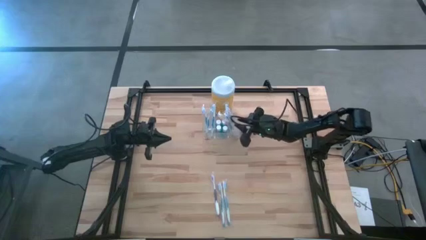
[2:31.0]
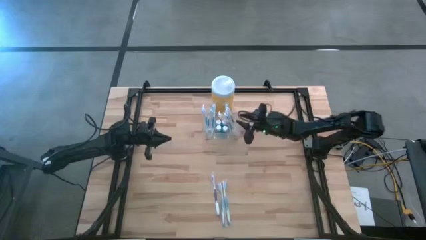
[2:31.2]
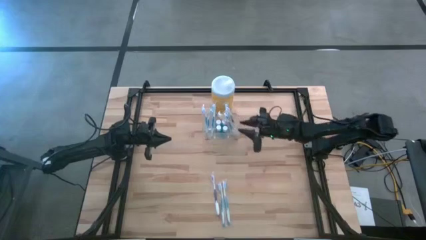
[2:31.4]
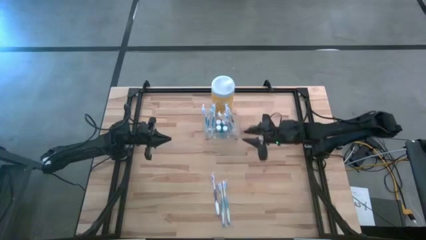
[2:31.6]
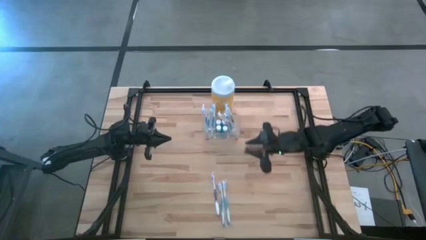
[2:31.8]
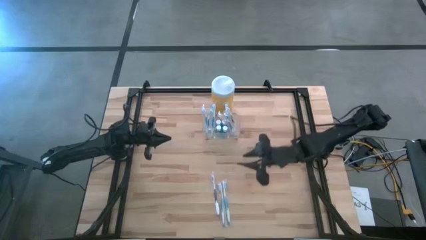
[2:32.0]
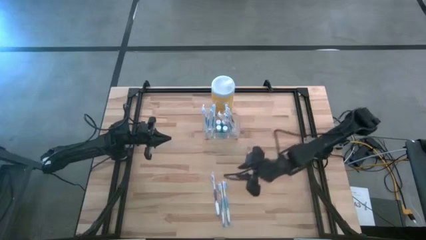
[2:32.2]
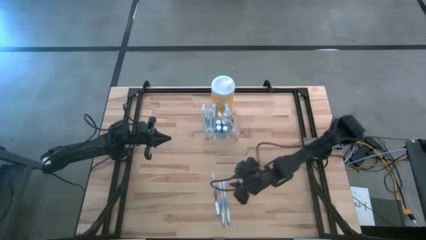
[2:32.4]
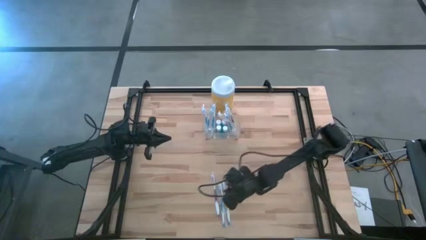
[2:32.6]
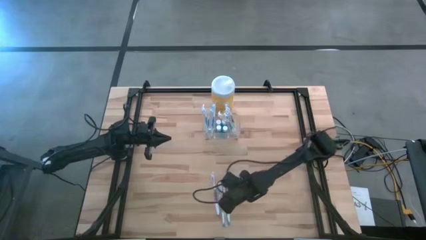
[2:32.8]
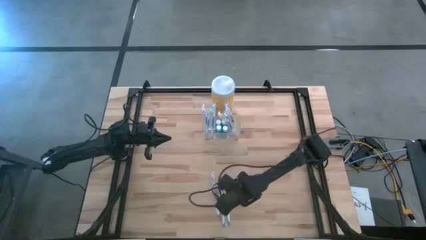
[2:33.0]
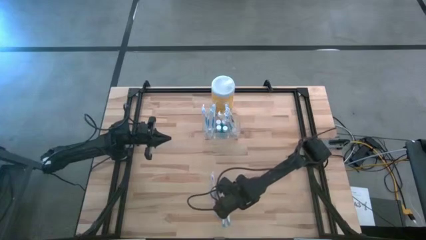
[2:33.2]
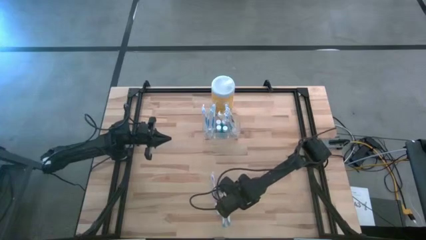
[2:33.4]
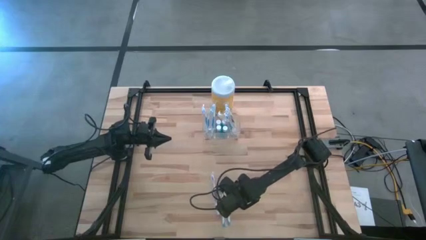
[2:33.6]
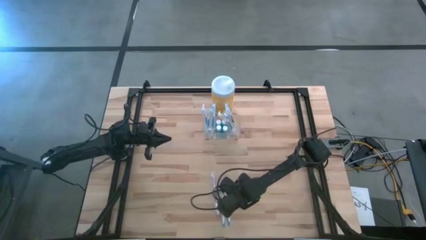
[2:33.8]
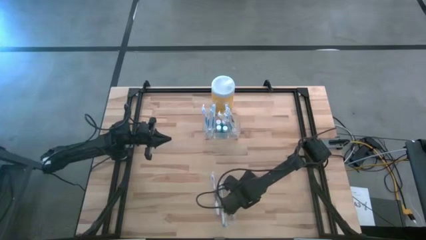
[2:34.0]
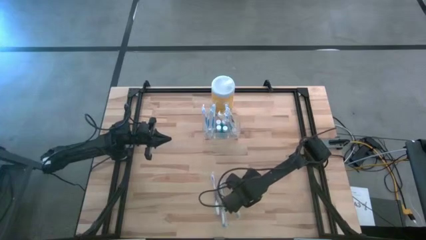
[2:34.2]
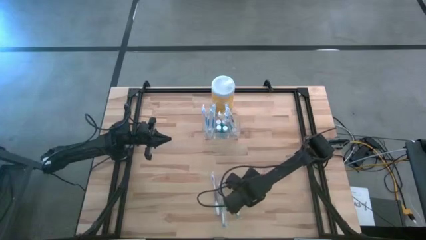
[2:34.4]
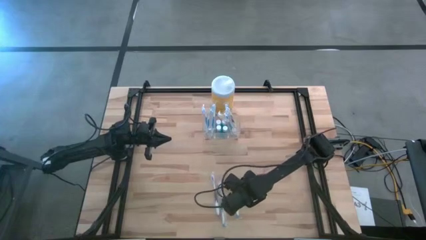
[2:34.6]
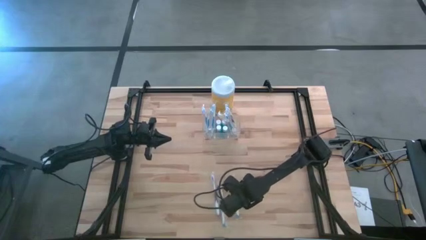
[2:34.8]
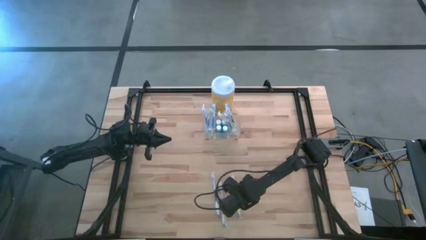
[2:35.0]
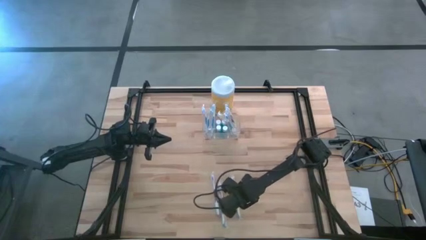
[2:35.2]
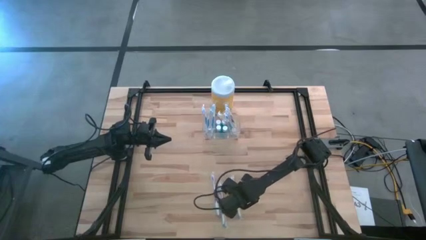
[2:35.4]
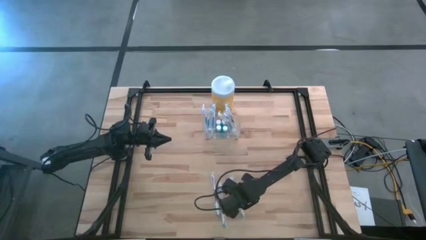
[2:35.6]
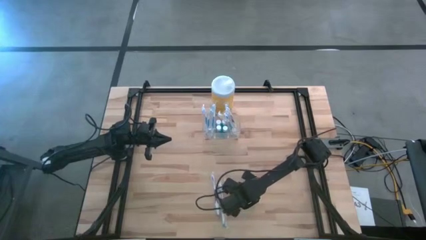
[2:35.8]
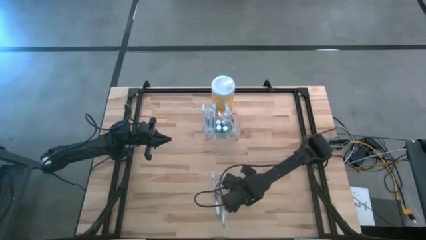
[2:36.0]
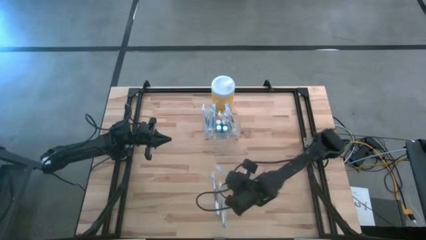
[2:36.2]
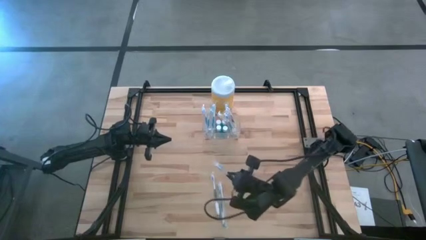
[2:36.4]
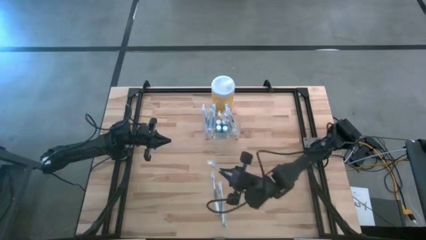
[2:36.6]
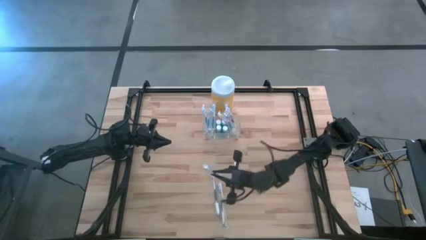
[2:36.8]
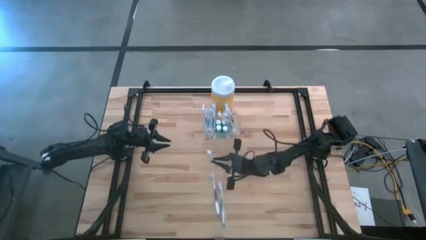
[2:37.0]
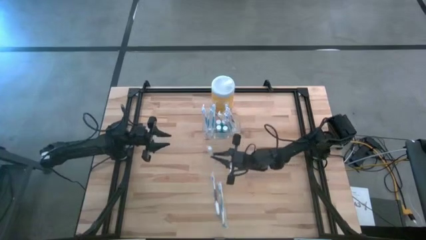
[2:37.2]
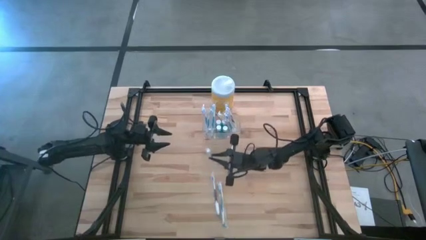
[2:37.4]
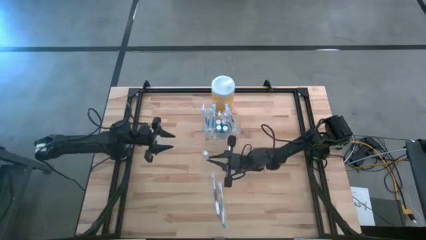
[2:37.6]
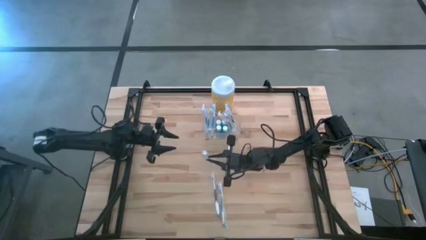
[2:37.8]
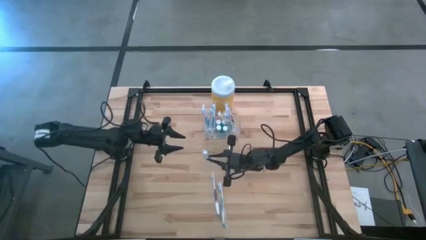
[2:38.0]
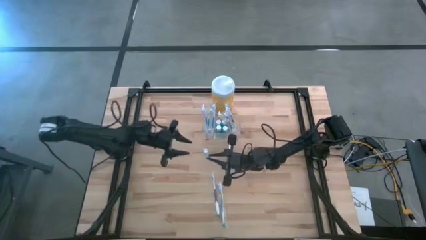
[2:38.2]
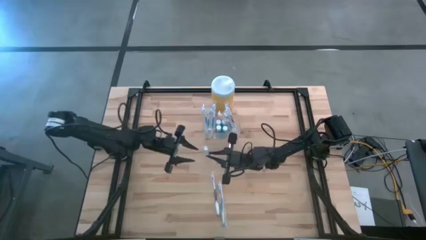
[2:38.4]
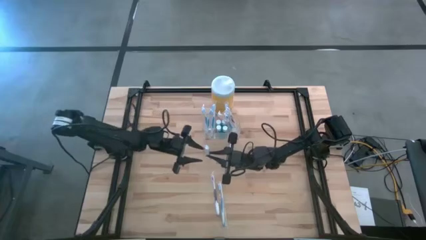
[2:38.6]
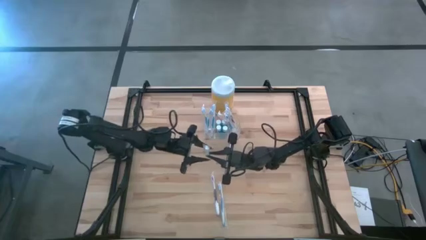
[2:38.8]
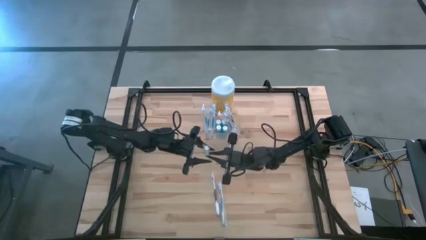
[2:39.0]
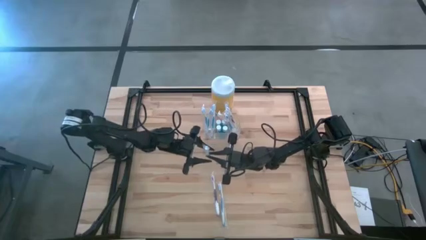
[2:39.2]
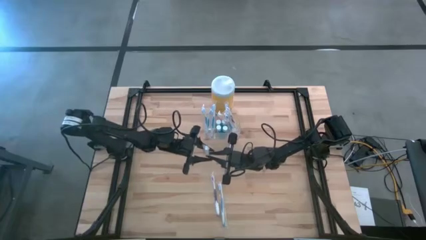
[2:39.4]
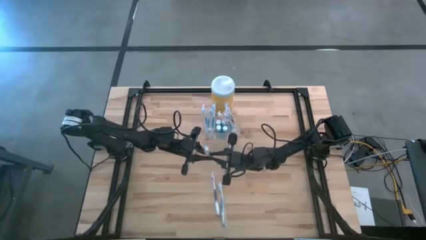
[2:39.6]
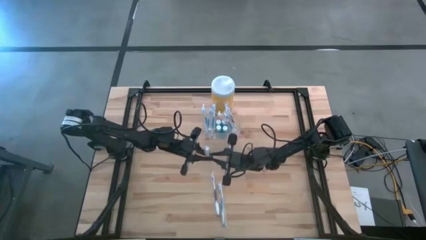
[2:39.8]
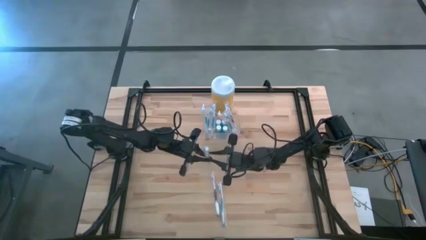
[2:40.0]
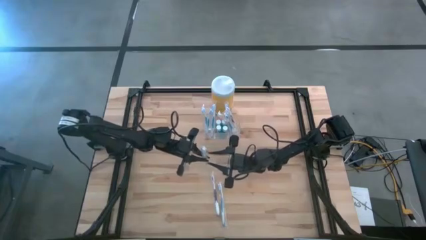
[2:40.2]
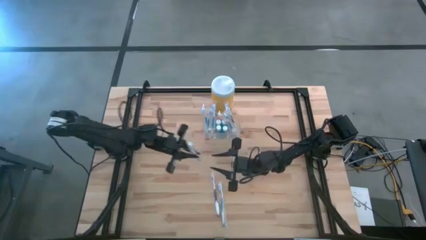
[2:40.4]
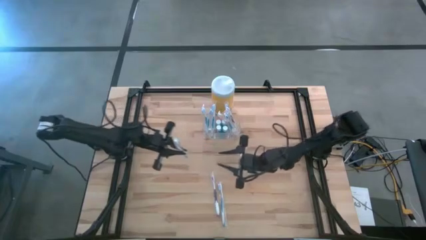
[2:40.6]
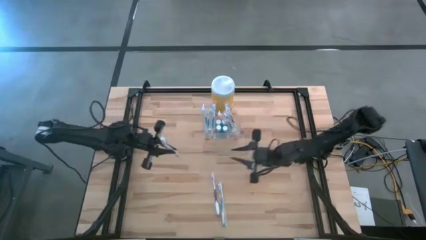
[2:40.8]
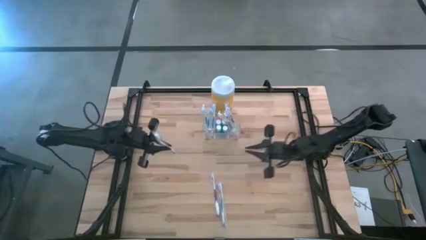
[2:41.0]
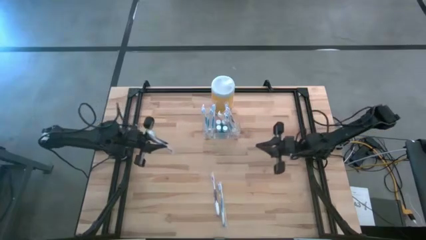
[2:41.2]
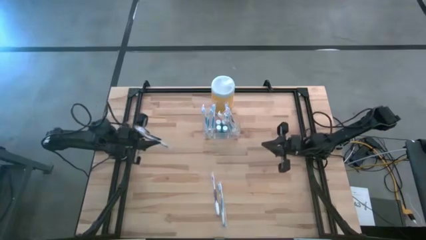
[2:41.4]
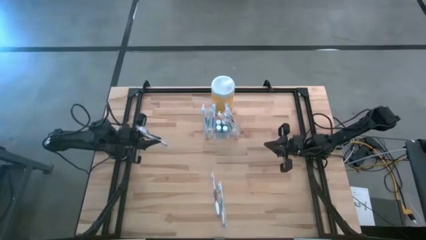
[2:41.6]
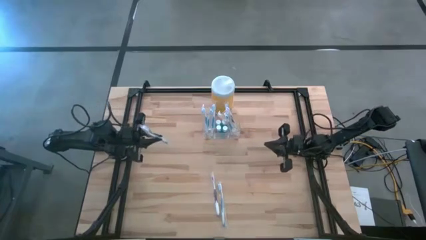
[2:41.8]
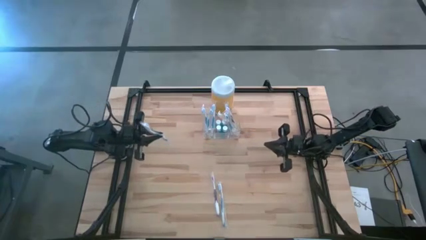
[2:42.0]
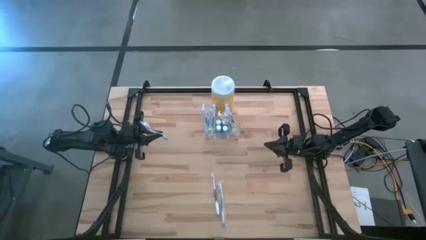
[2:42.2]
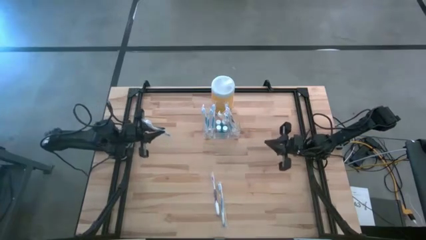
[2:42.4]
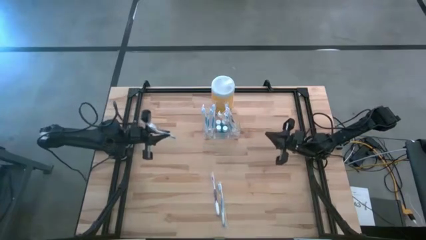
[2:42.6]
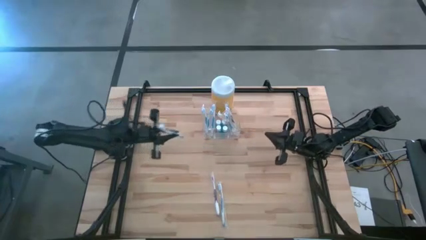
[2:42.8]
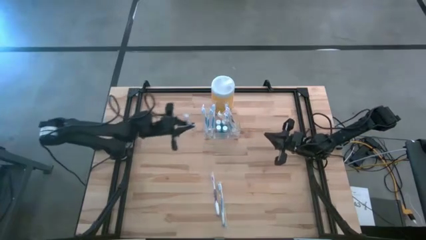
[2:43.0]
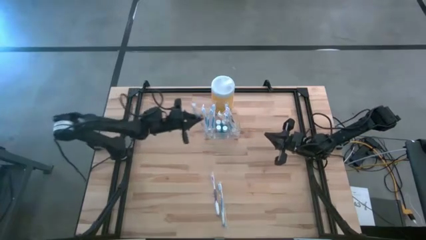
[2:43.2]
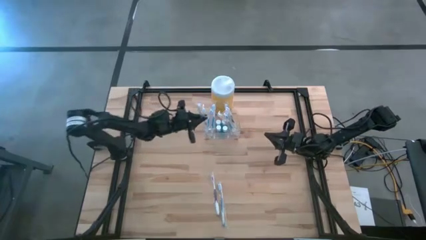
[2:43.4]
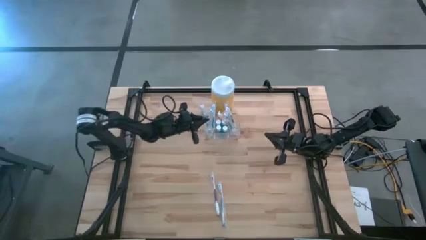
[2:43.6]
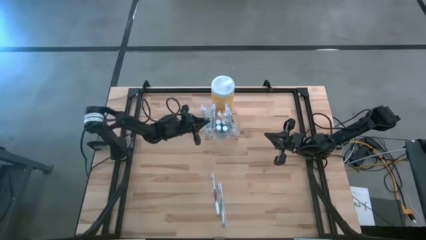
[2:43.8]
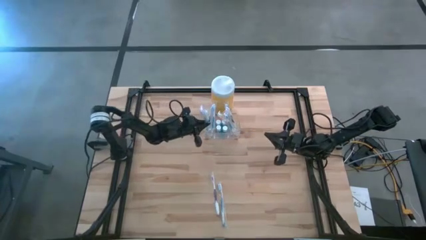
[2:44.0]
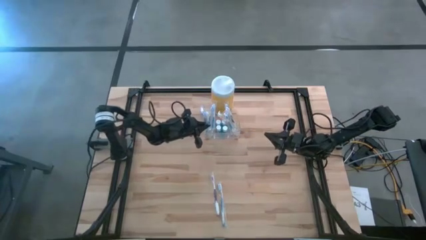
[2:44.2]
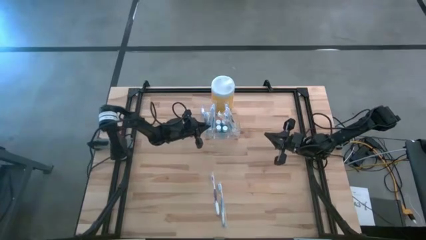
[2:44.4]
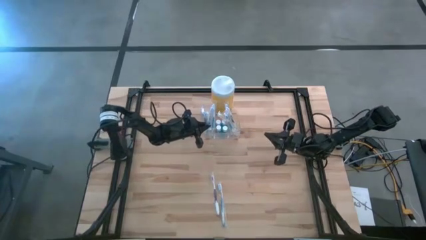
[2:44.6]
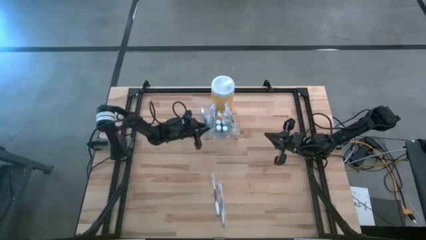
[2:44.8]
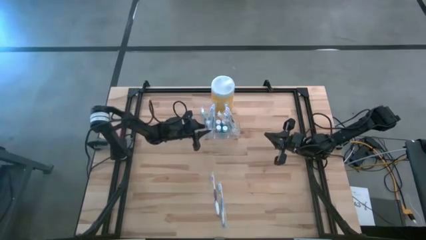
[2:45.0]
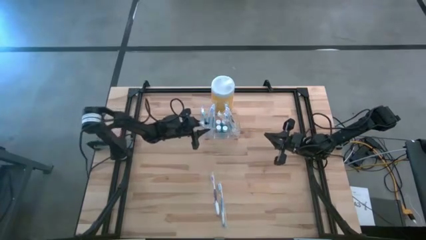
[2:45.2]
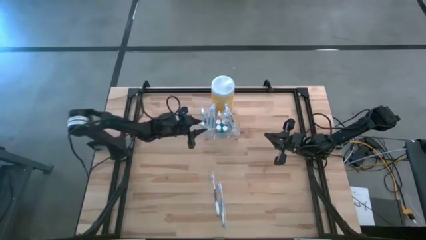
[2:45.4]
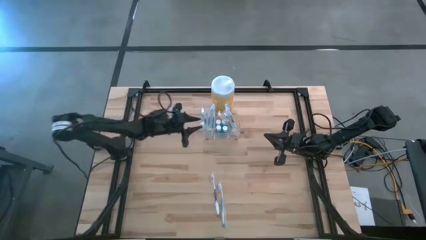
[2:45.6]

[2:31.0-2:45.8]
Task: Pick & Place toothbrushing station
Put the blue toothbrush into the transparent organizer

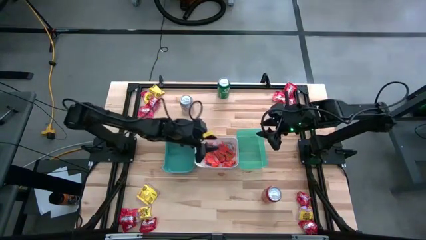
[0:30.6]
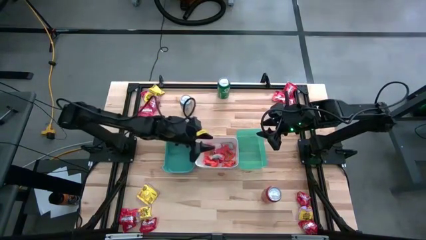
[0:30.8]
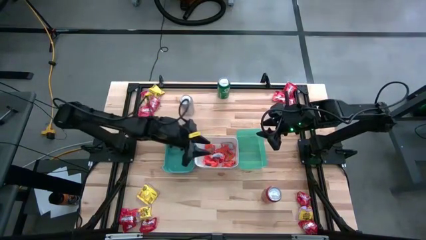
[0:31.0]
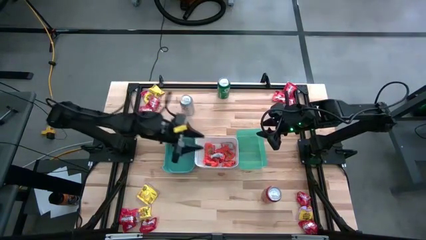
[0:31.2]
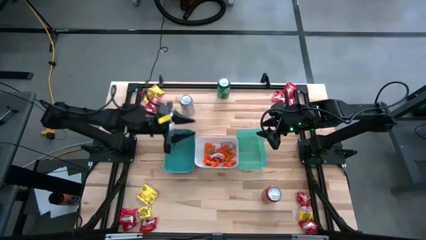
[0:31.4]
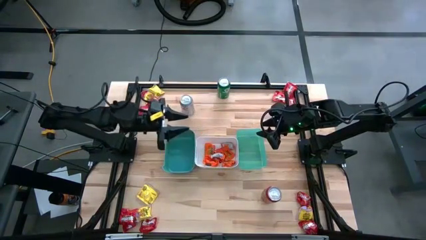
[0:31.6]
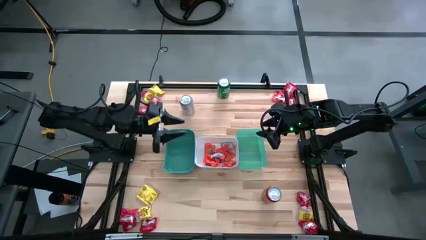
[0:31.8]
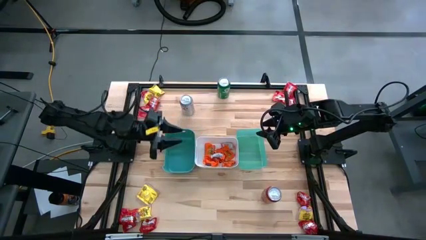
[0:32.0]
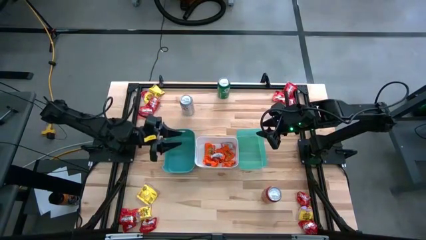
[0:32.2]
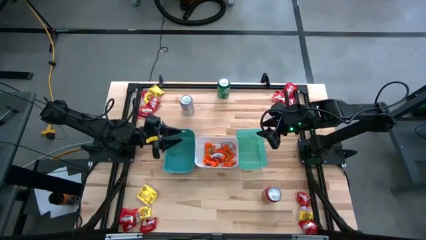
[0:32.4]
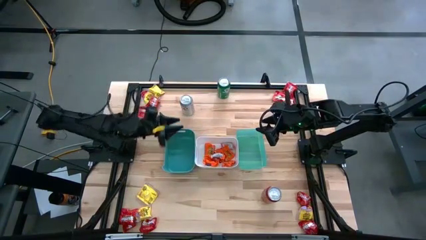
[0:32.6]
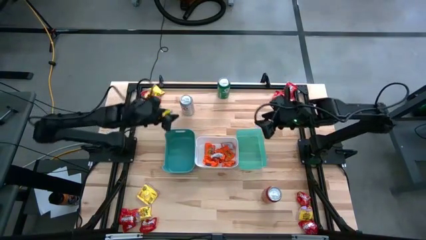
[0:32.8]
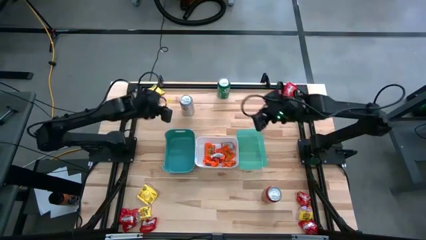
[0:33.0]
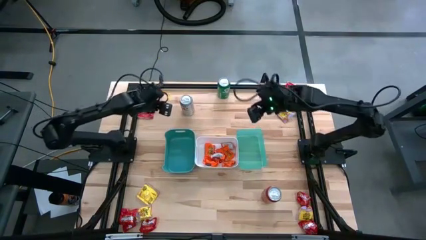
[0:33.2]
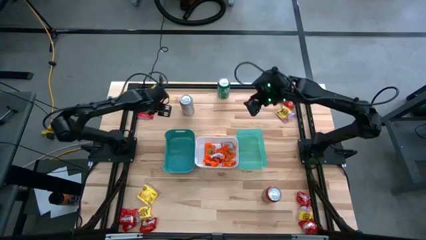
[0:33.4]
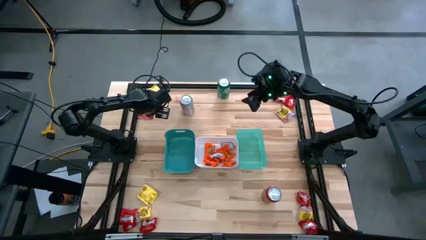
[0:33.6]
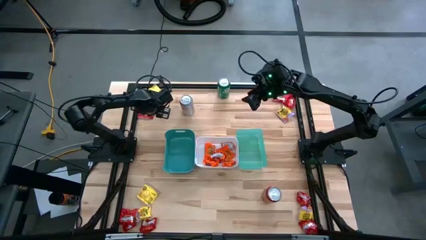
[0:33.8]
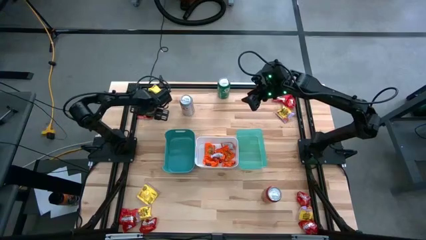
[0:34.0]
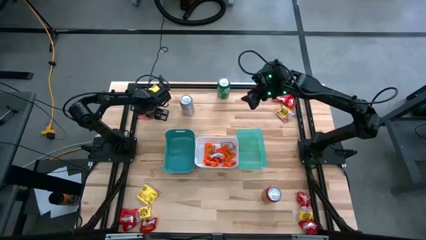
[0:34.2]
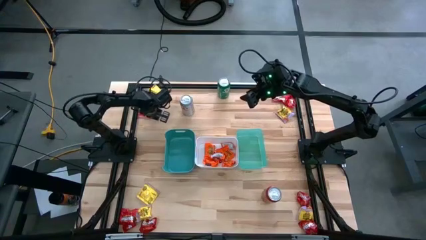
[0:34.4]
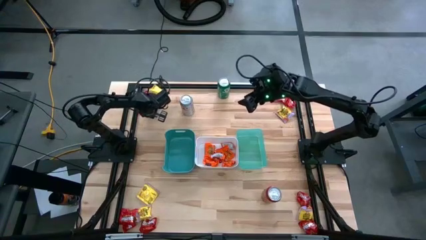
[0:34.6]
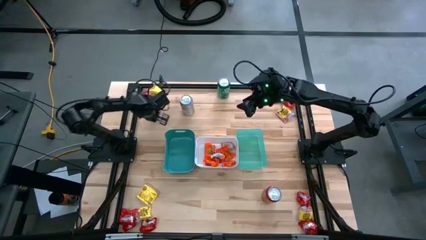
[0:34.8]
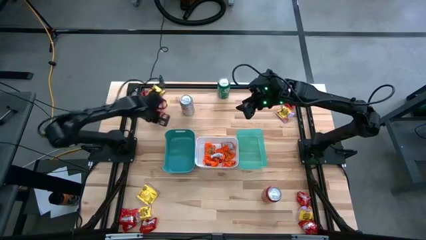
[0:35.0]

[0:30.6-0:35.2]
Task: Sort candy
Put the red candy into the green bin
